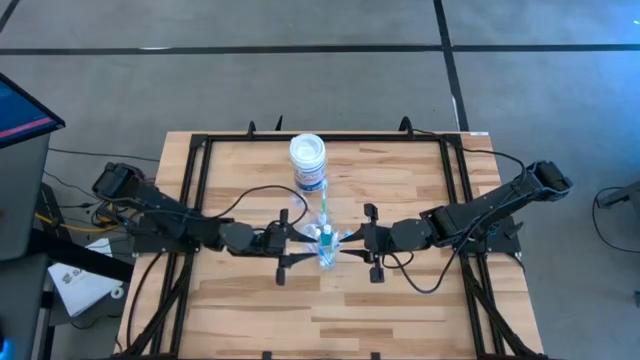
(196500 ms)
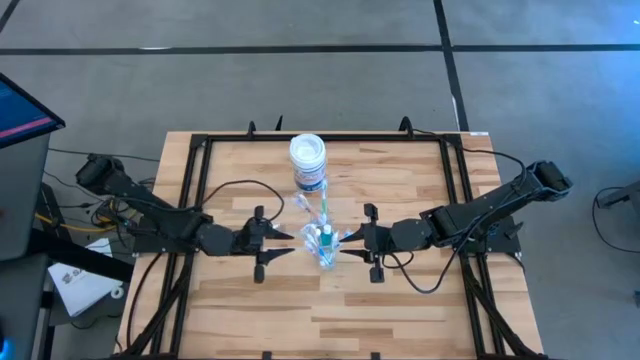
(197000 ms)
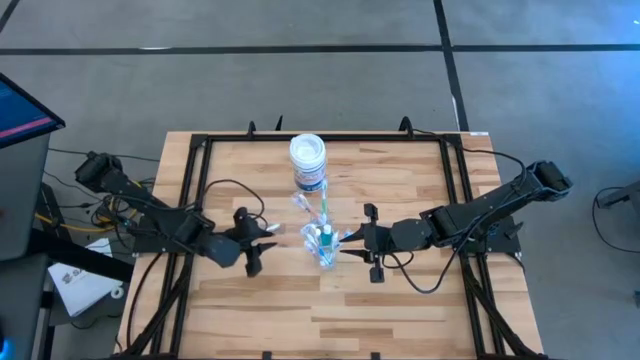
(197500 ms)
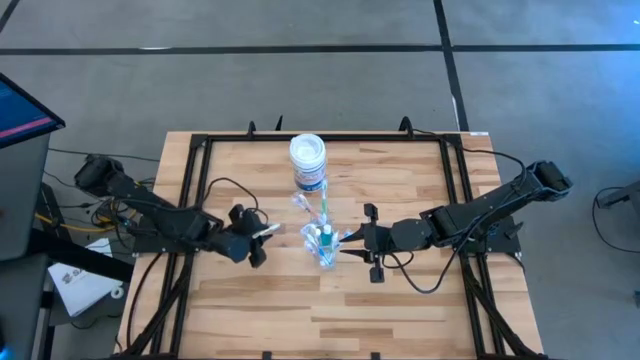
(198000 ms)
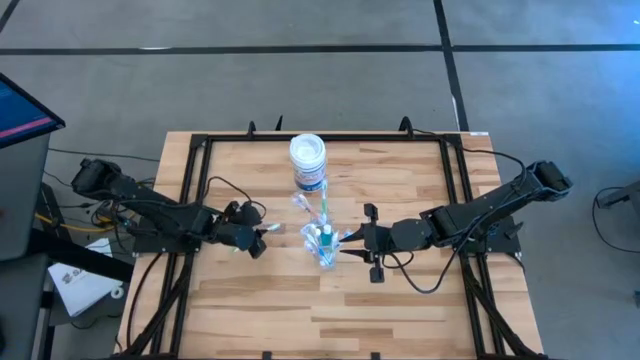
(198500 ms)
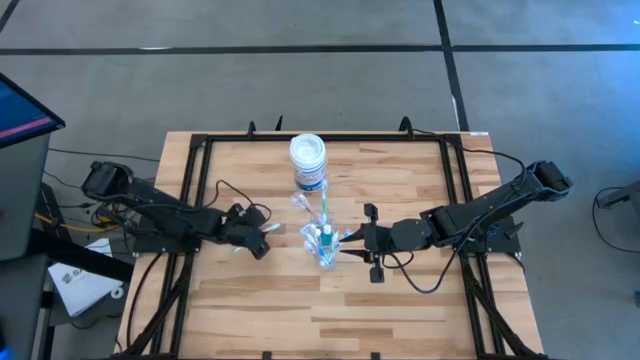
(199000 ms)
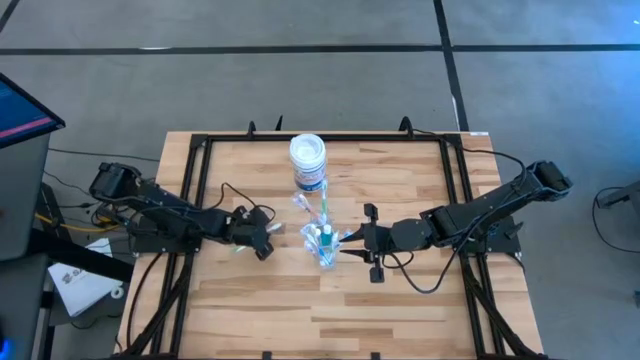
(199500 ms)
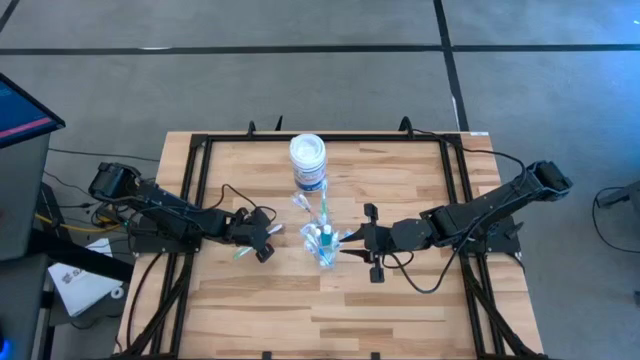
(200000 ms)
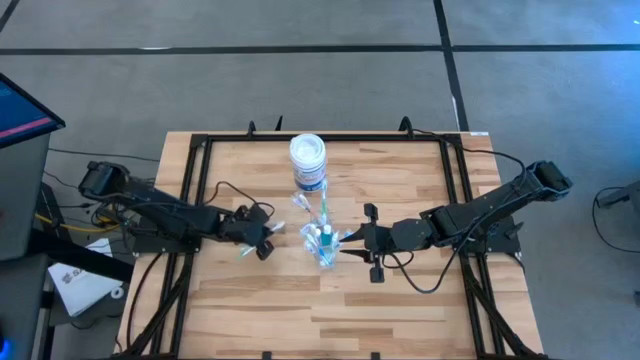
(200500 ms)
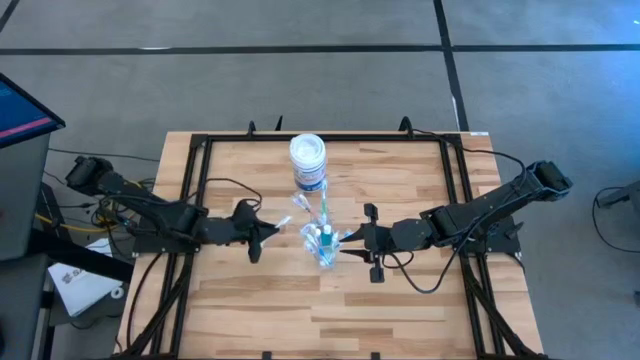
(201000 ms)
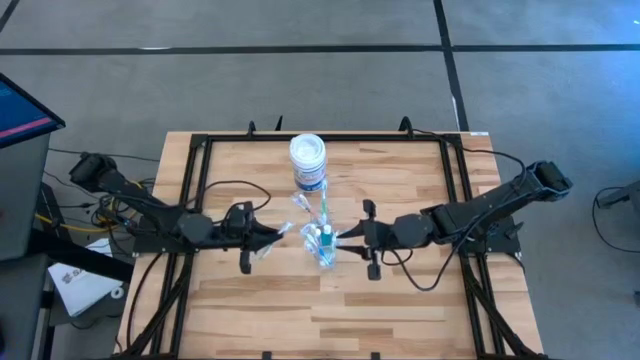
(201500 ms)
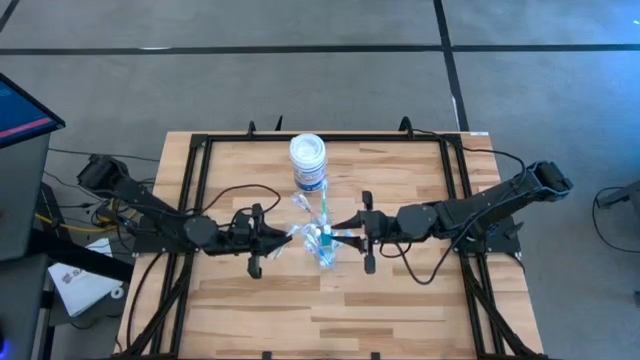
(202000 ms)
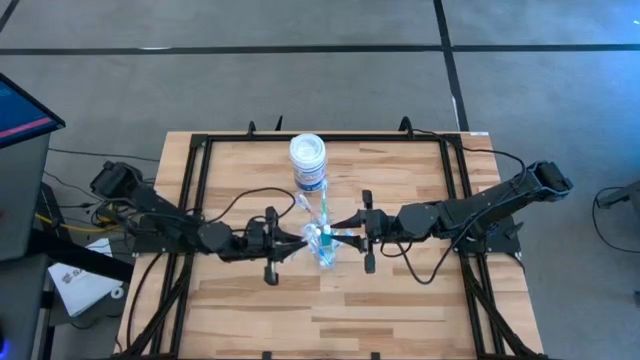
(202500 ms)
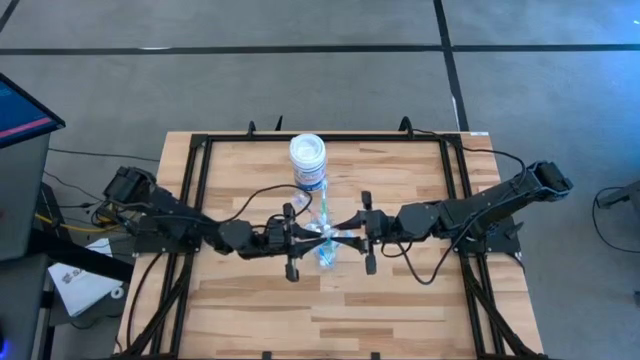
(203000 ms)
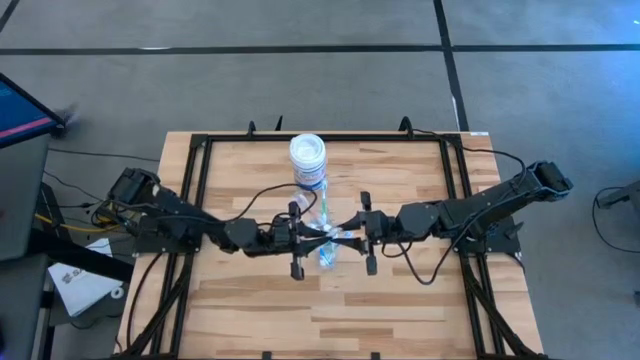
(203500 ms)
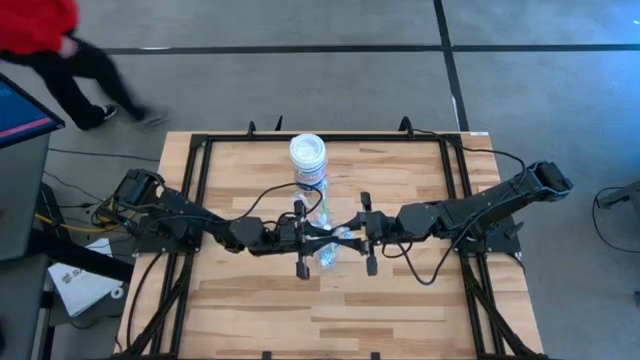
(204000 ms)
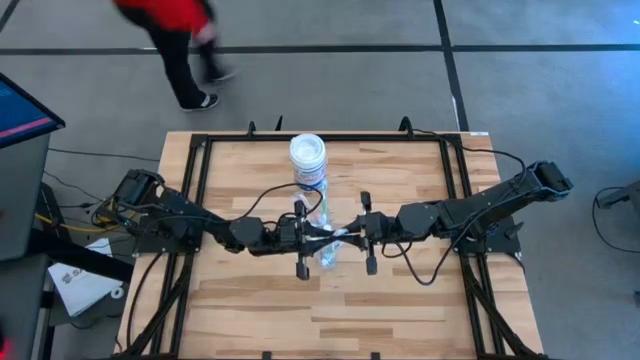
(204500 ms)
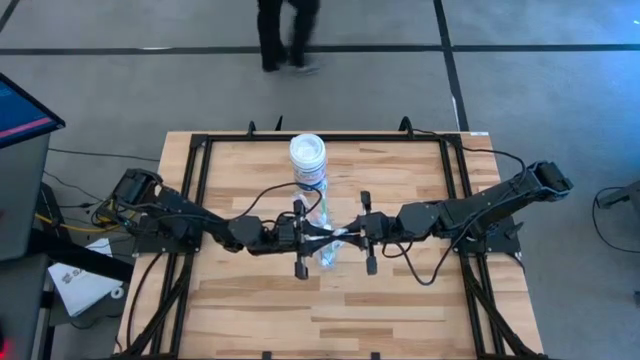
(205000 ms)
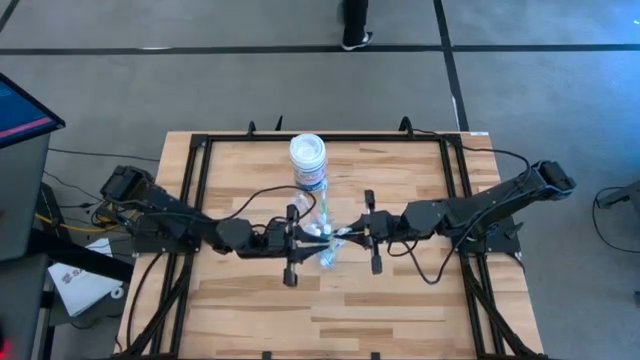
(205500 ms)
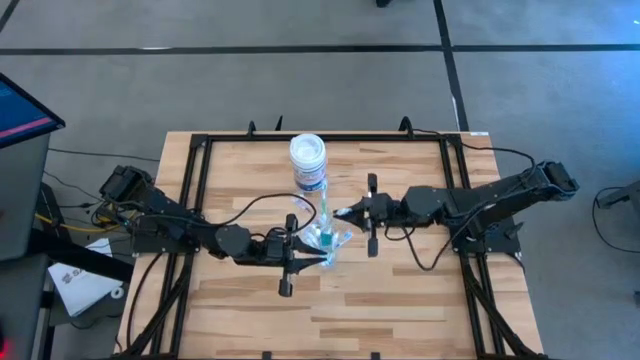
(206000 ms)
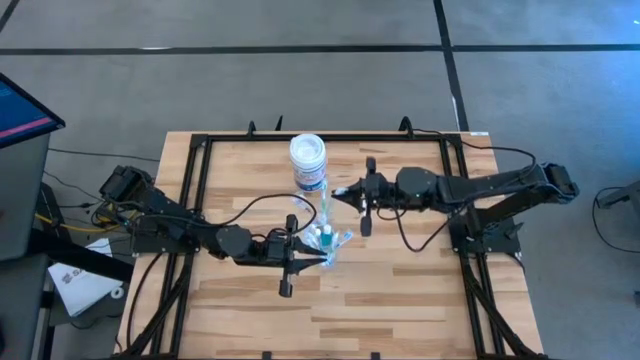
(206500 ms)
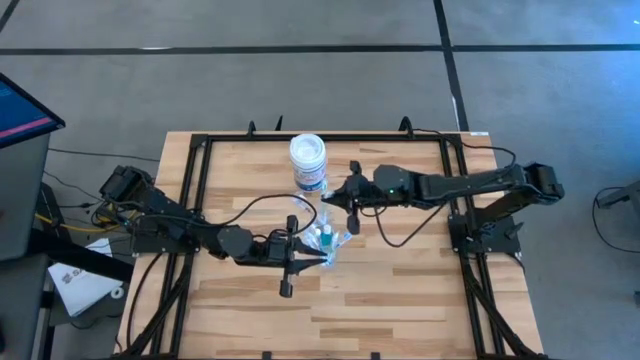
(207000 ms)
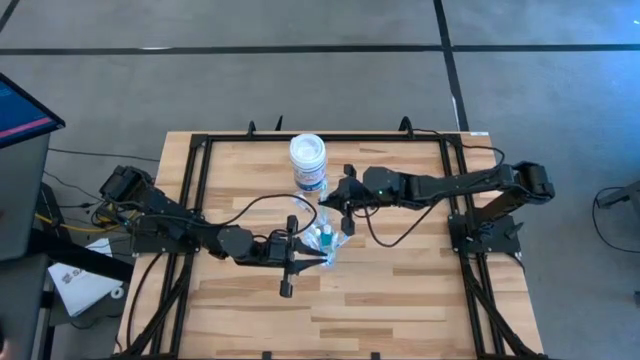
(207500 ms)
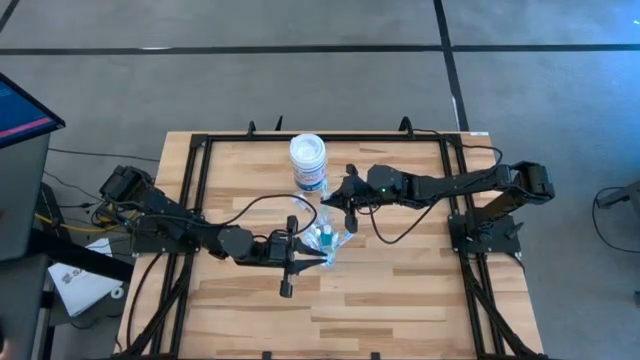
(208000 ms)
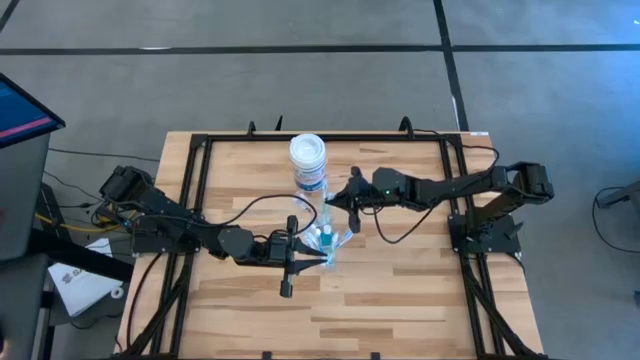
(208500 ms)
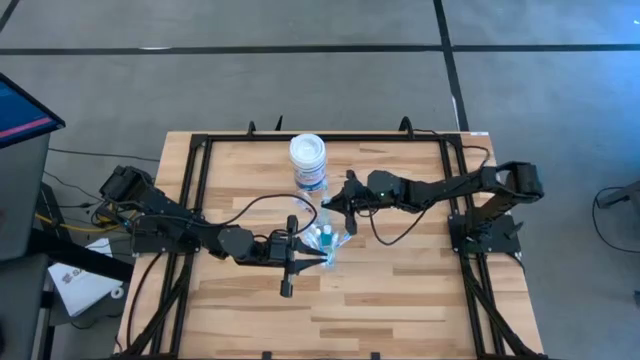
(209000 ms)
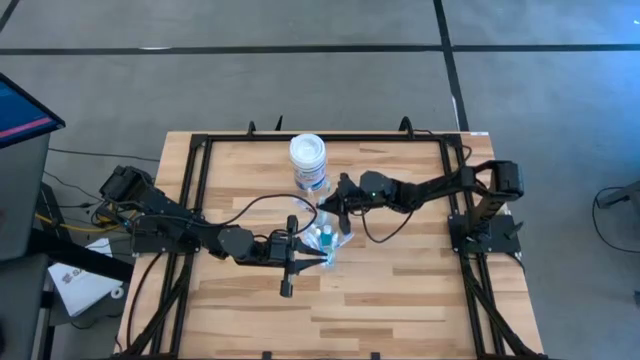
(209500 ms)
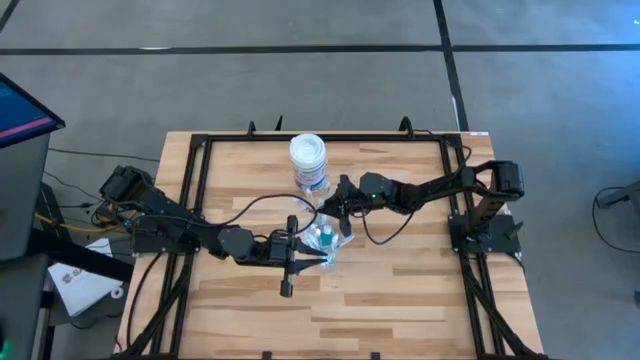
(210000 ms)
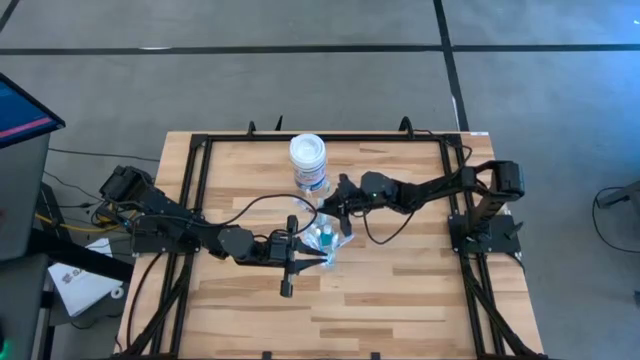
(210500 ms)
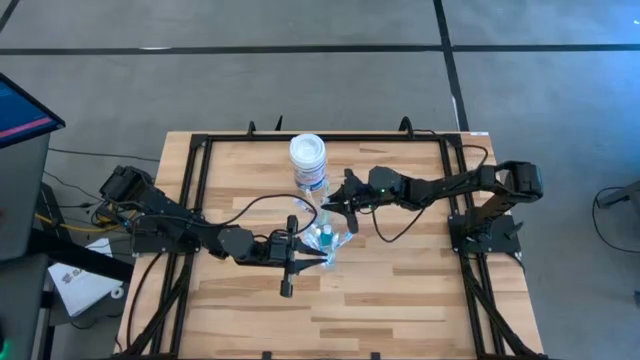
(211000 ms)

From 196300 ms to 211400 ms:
Task: Pick & Place toothbrushing station
Put the green toothbrush into the Transparent organizer

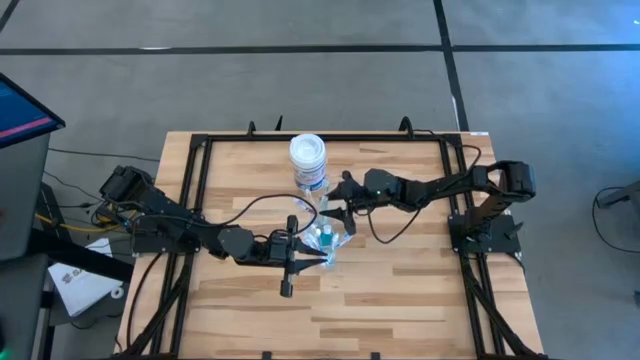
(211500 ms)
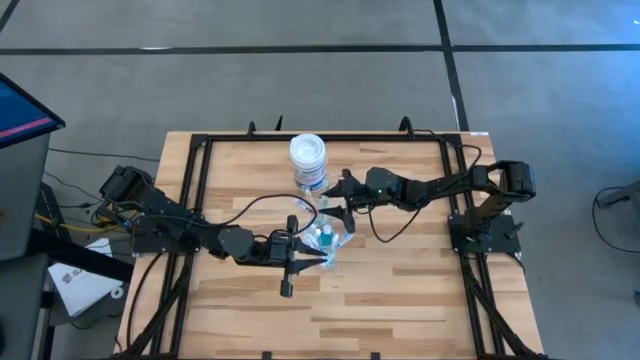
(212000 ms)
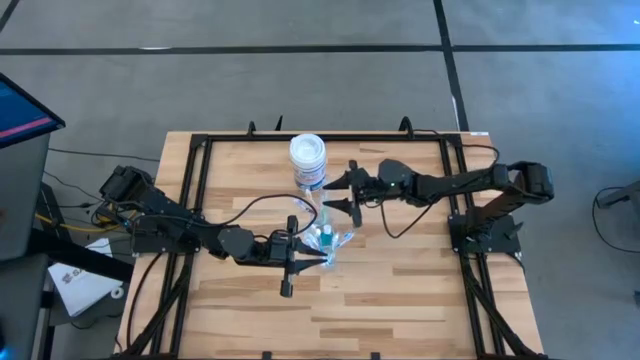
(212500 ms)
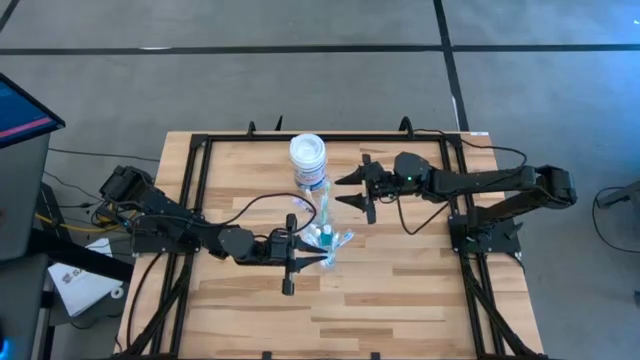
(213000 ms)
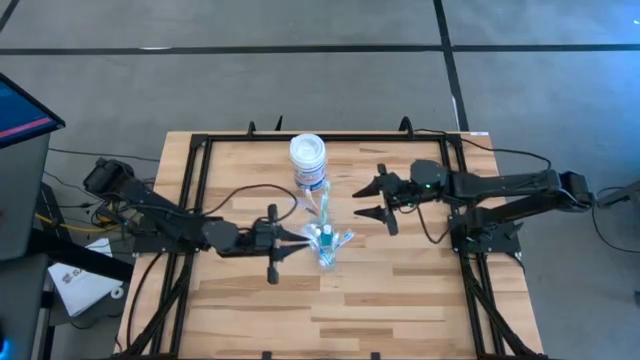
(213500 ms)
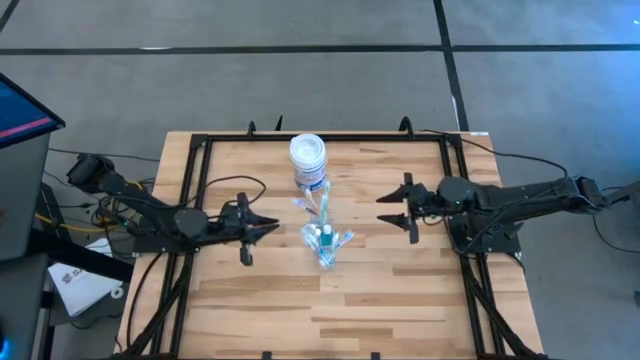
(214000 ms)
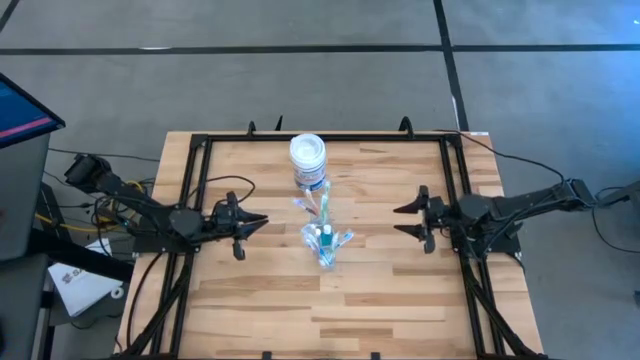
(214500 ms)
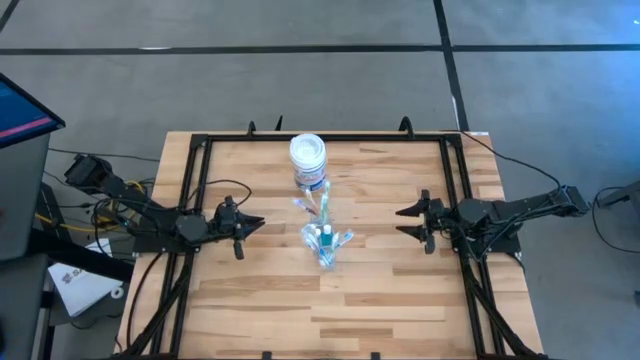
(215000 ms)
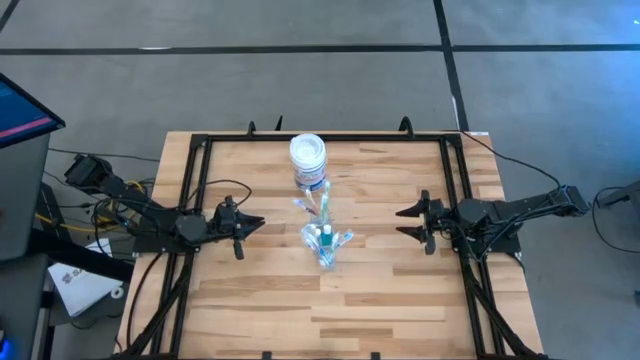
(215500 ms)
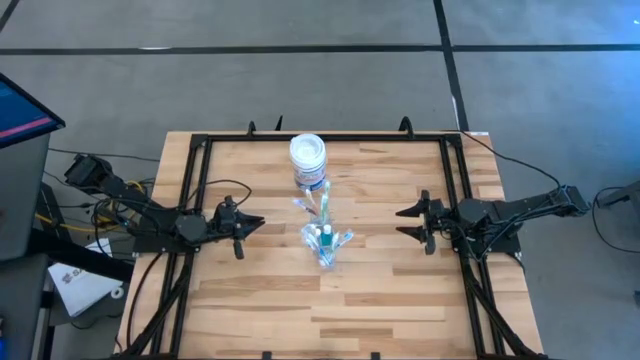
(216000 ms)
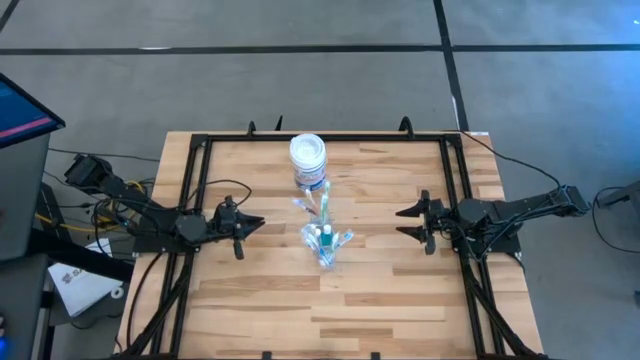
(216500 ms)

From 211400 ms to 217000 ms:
Return to Home Position
